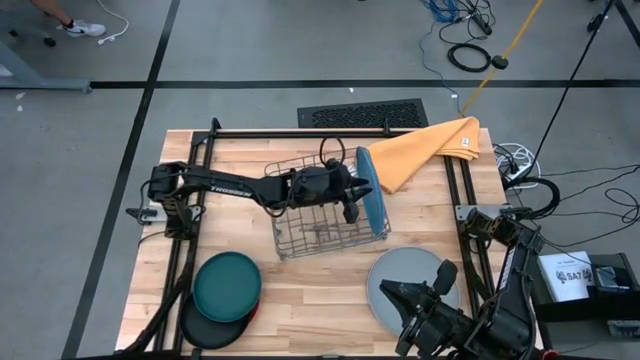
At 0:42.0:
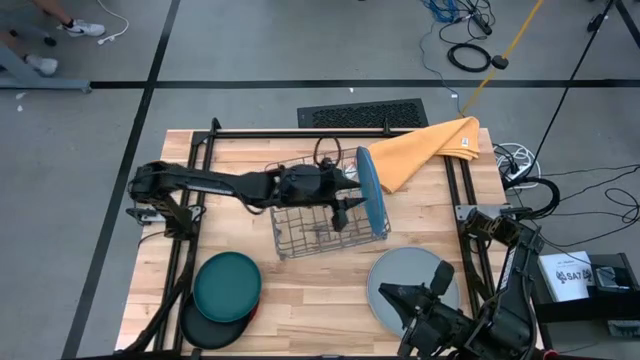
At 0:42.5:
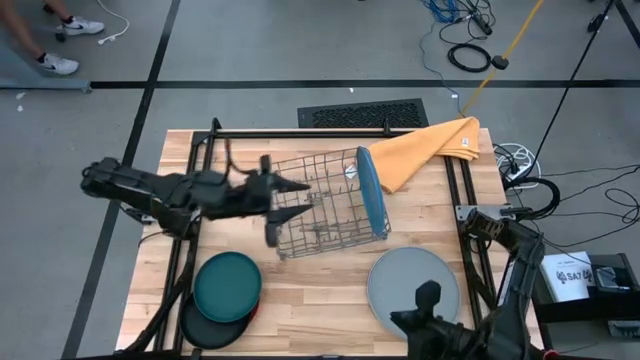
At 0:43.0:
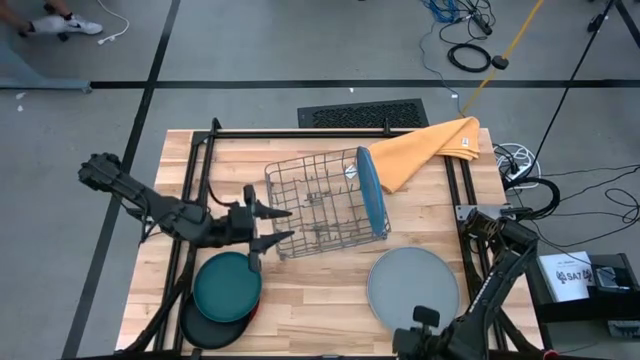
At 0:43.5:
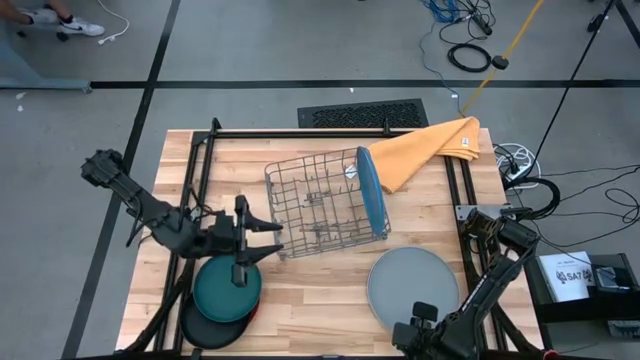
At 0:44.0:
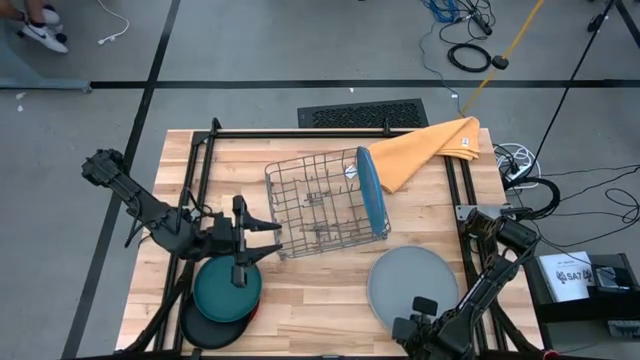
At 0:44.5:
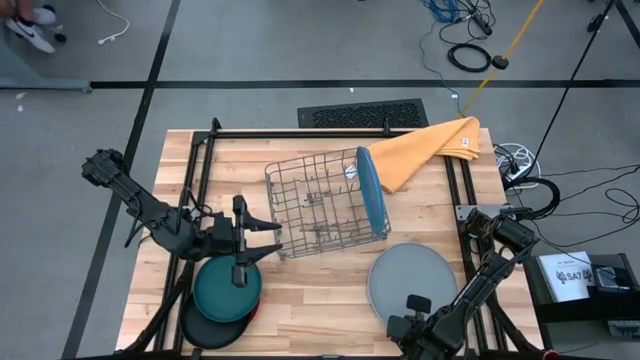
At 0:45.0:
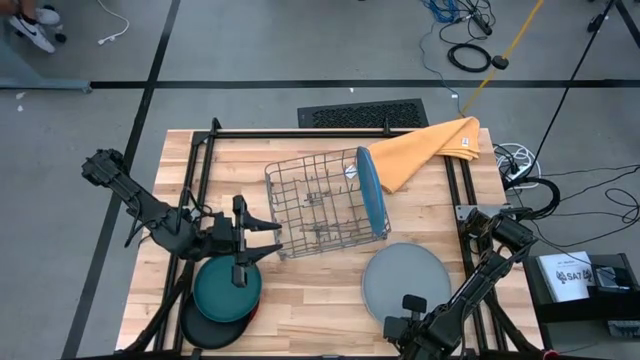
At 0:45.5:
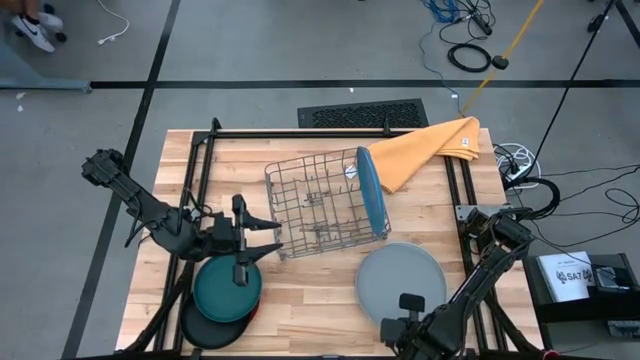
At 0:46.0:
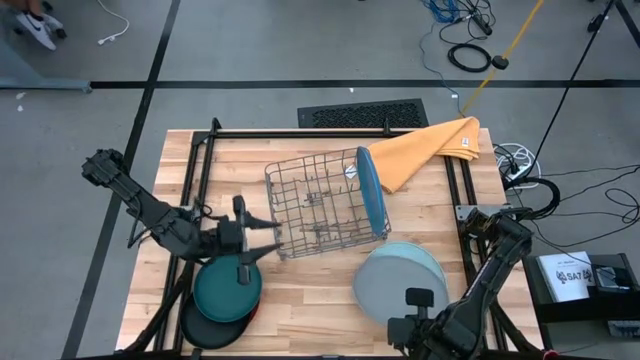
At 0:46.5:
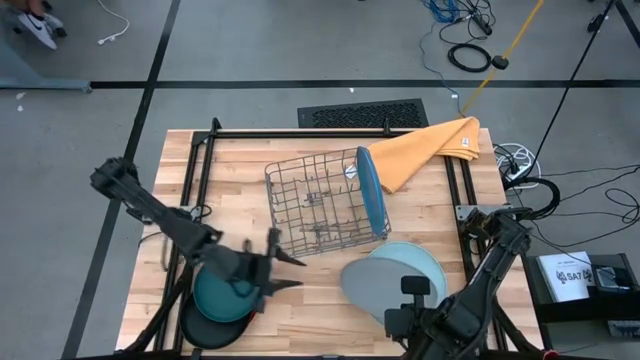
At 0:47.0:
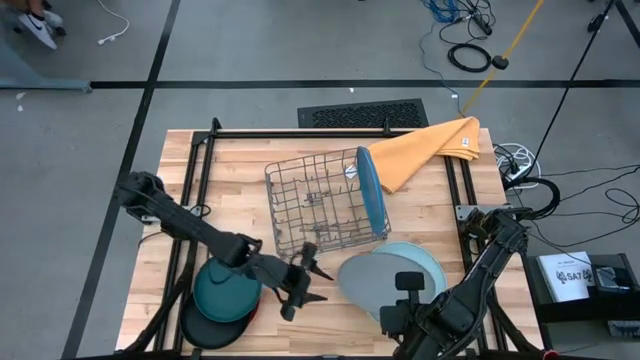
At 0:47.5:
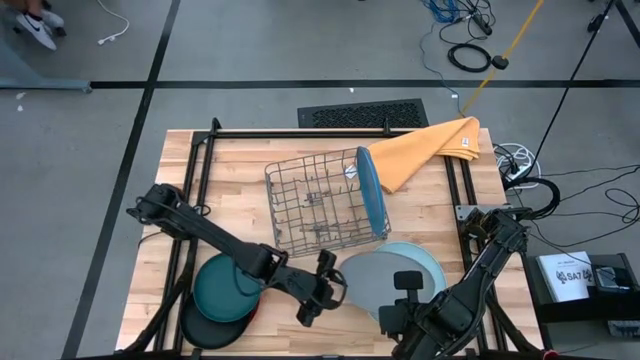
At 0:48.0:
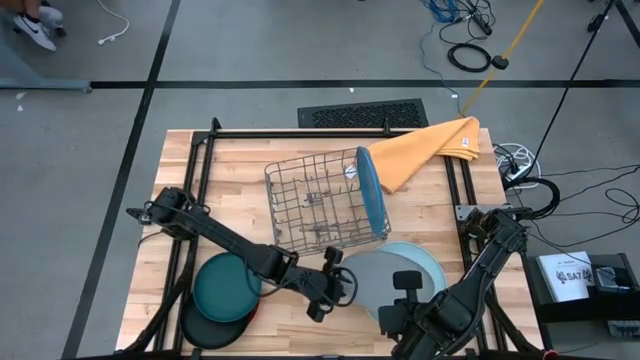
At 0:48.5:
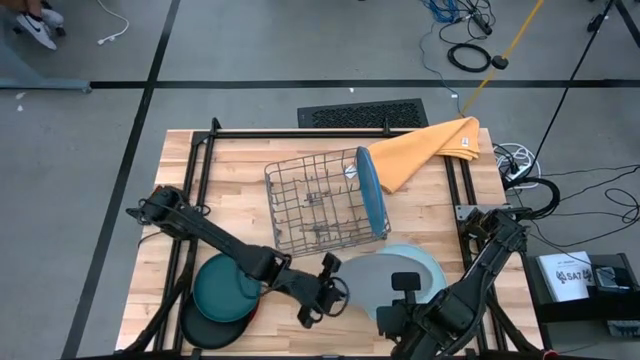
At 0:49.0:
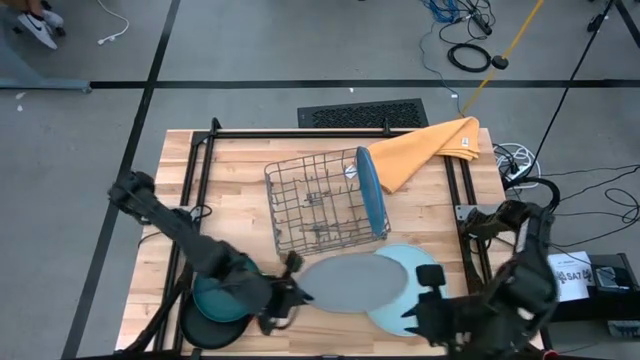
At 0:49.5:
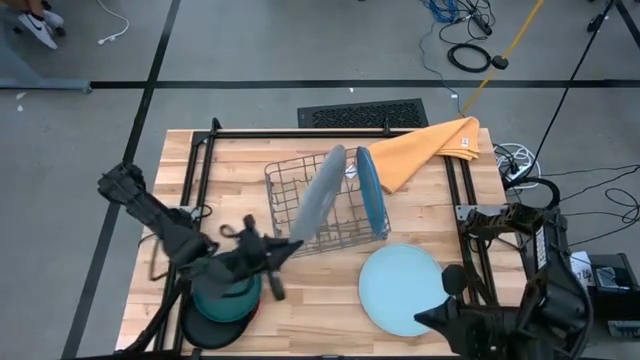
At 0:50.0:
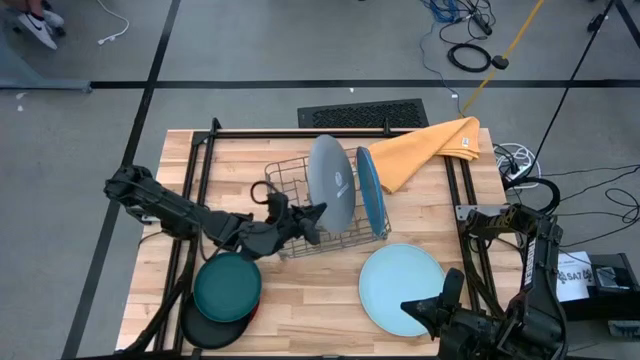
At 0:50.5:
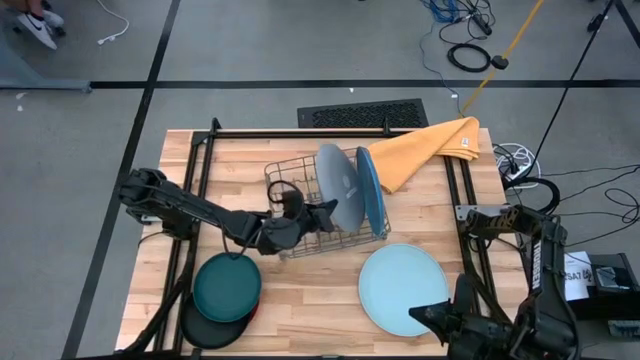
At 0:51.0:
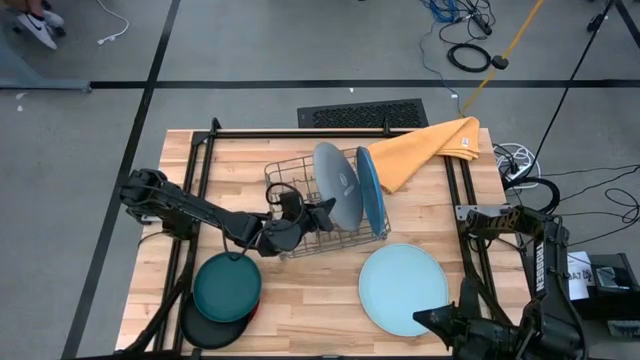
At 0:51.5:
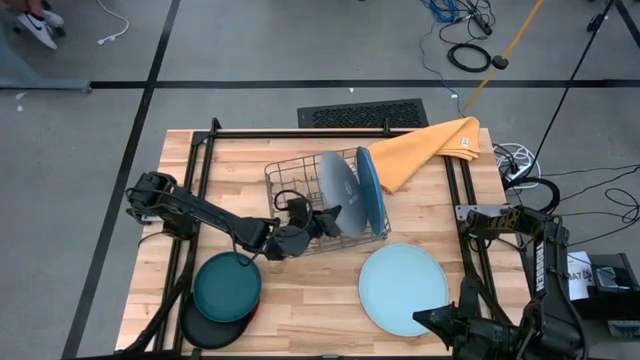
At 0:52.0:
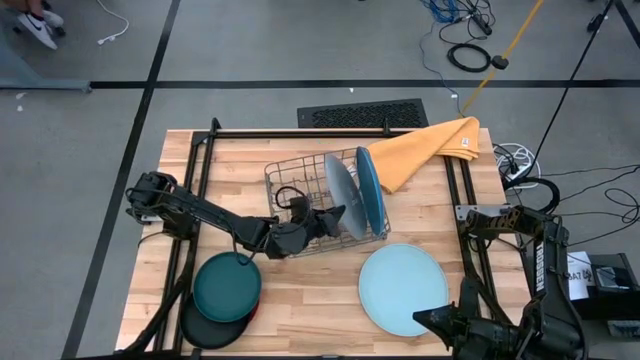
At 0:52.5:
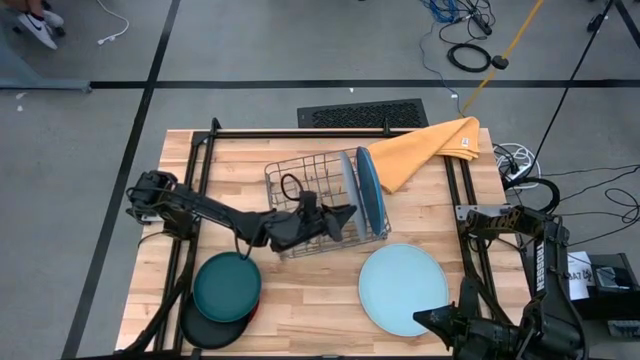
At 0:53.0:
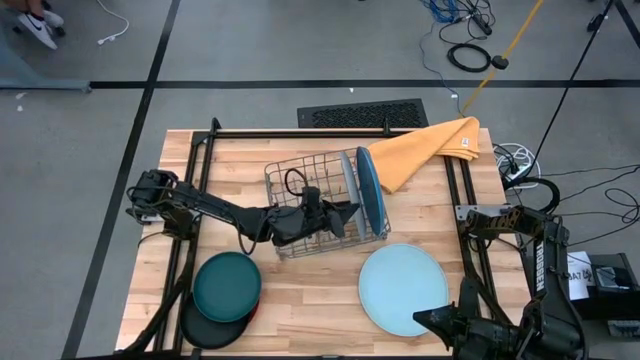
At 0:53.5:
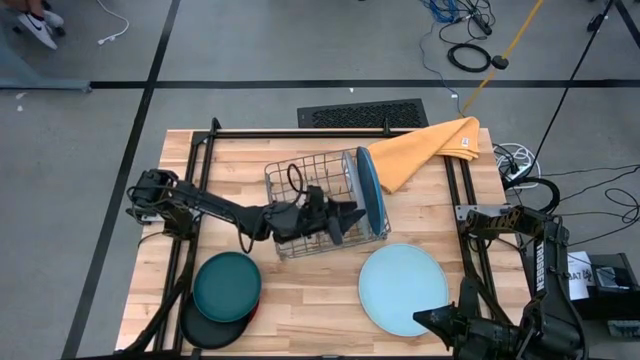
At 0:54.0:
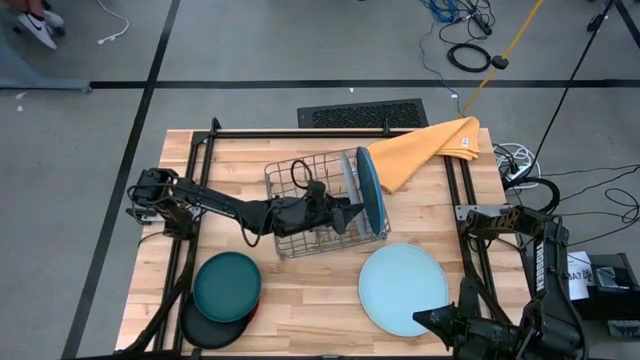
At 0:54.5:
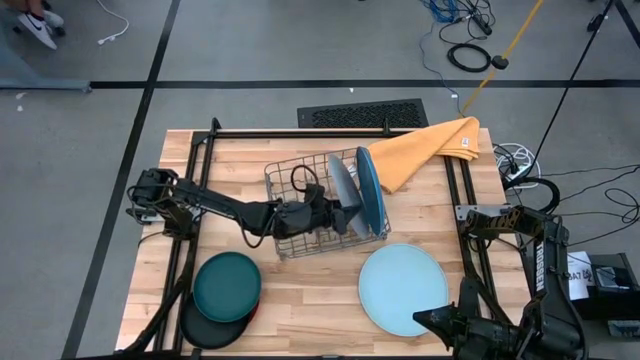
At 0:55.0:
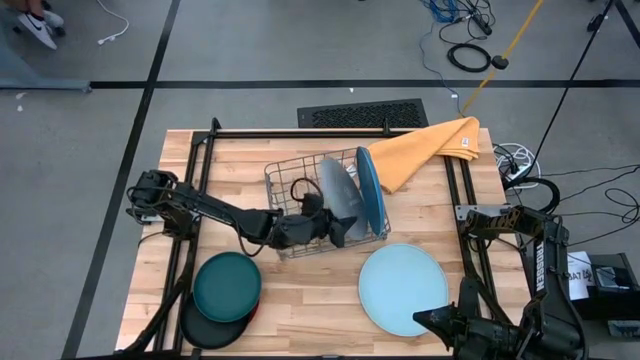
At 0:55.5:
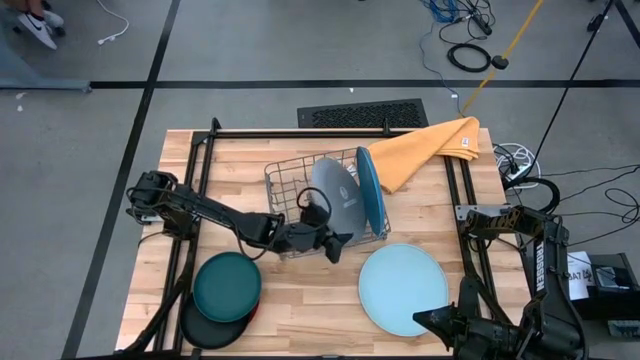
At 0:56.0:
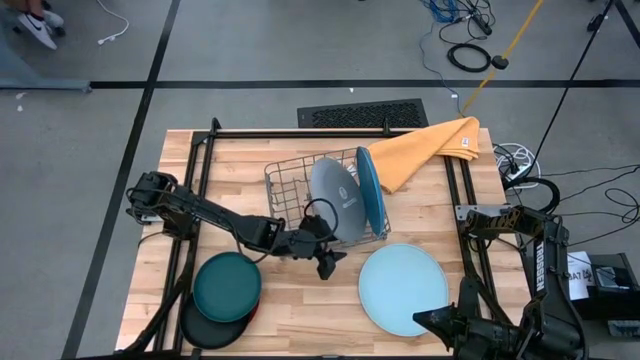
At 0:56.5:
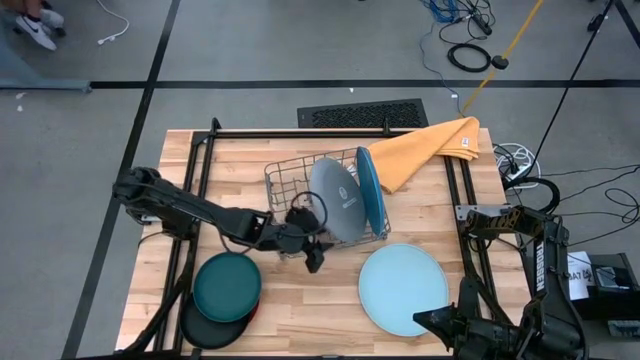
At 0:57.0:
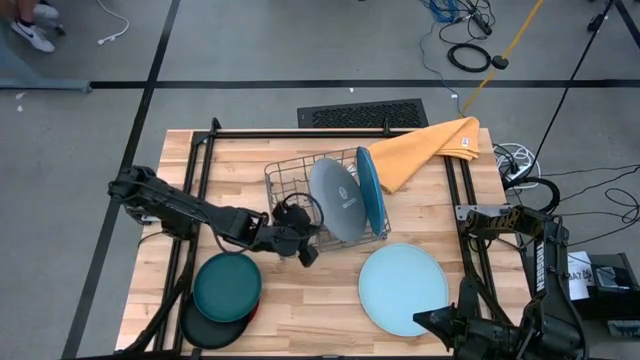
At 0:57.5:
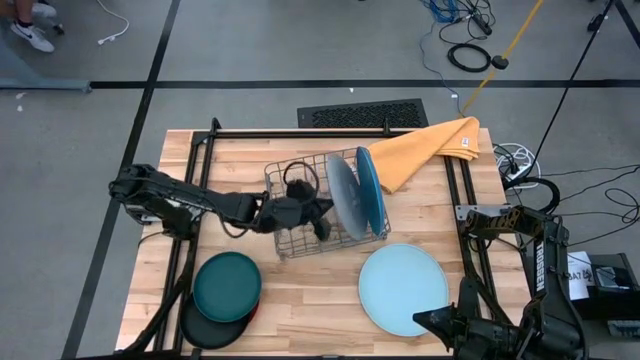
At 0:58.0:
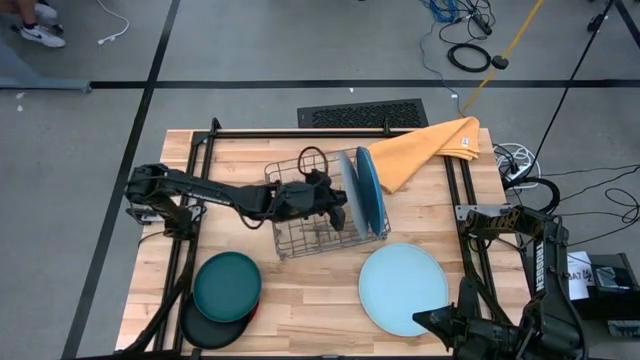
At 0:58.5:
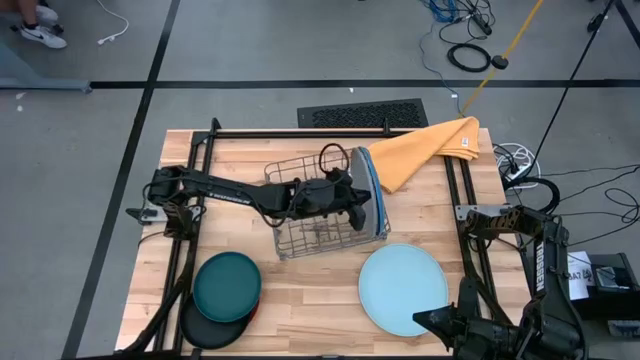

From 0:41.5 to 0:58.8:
Task: Sort dishes
Put the gray plate into the green dish rack

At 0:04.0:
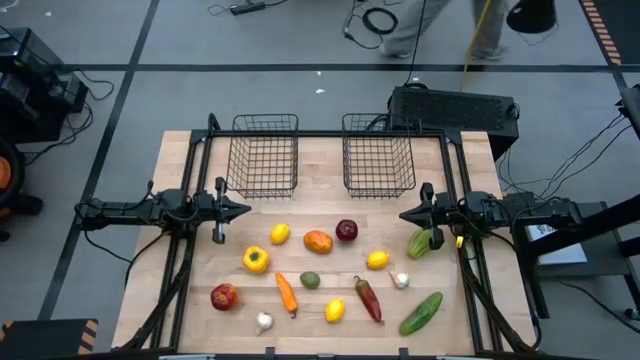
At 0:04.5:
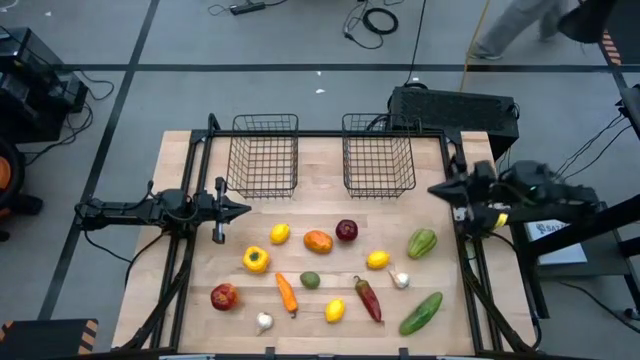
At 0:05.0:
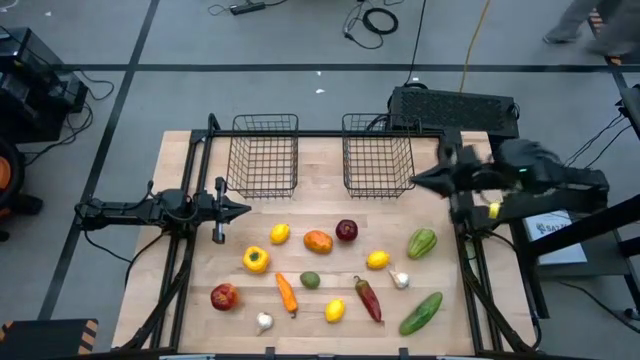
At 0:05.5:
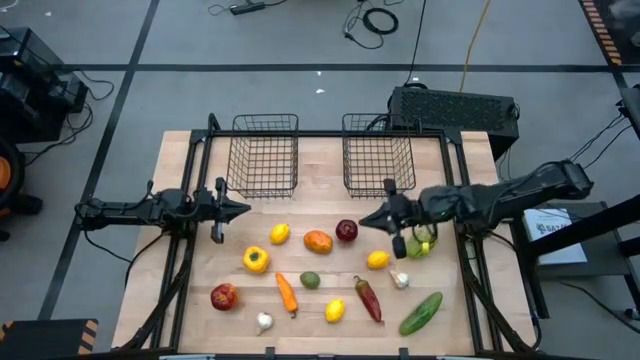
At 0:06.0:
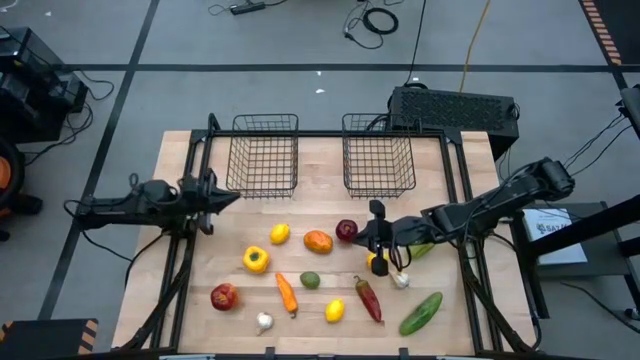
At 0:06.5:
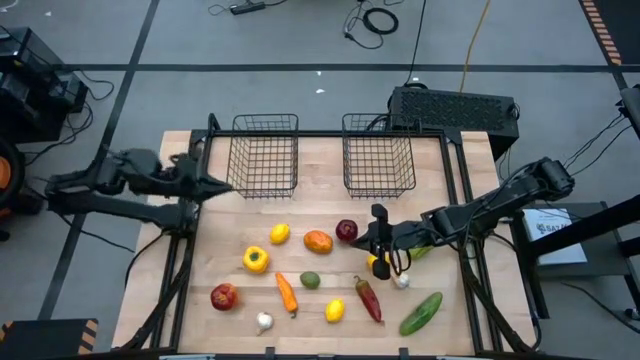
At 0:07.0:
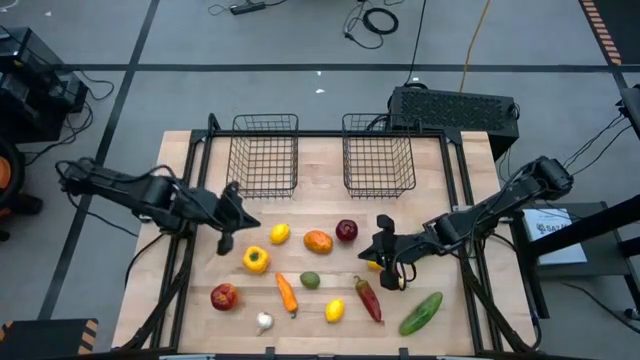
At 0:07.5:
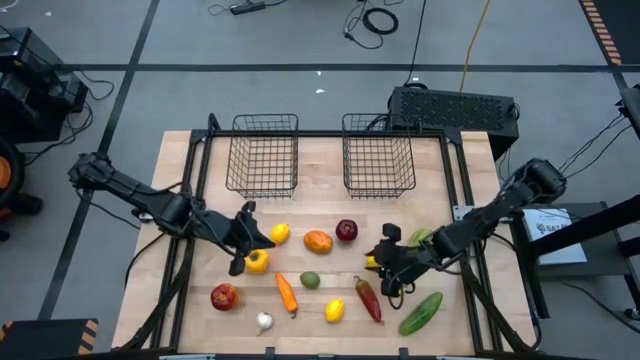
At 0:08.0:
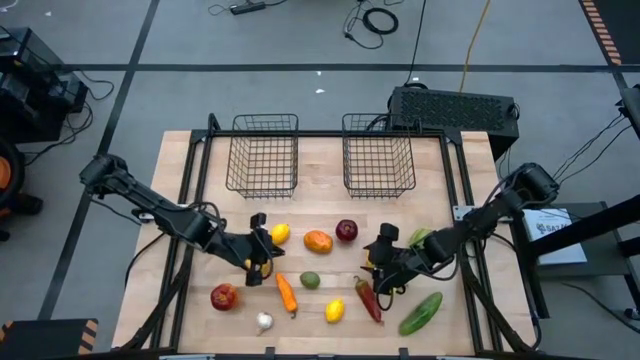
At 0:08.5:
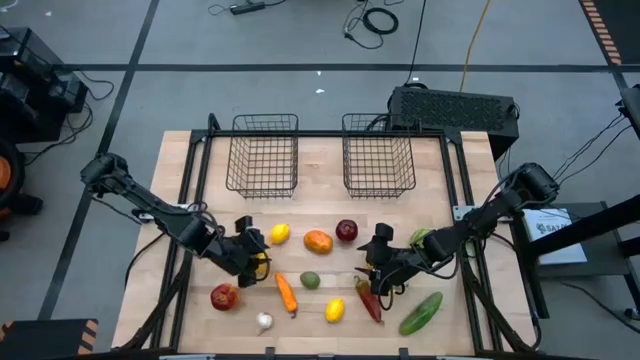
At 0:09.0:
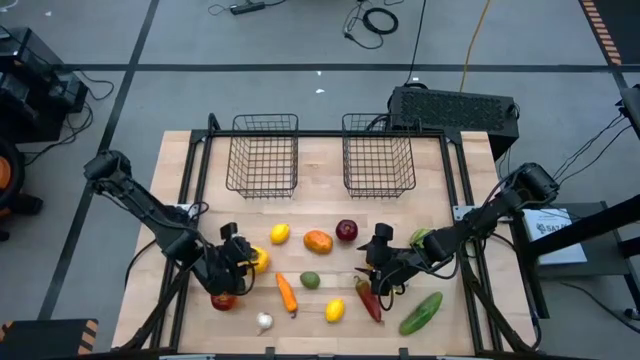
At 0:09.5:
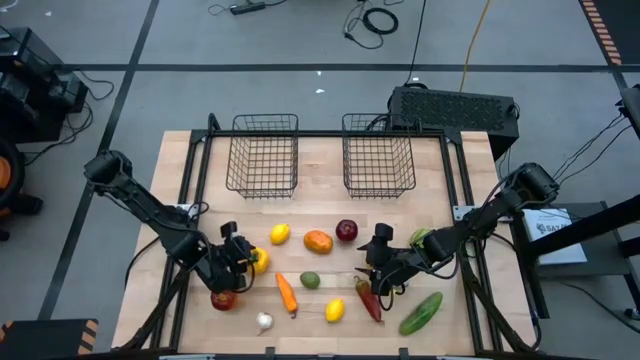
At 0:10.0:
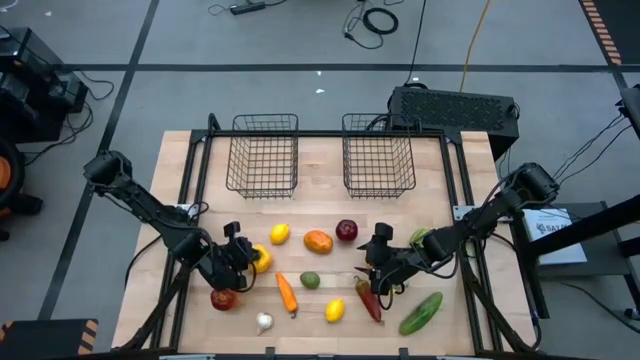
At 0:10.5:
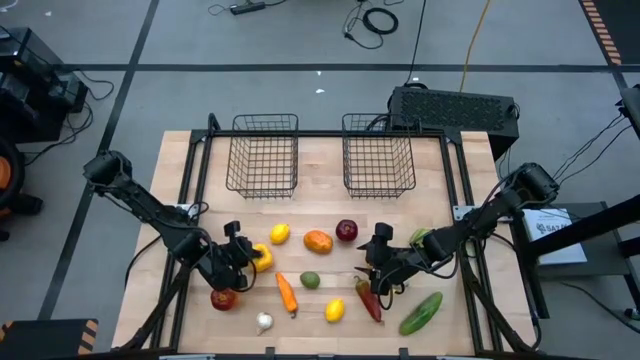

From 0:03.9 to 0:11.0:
Task: Sort produce into baskets
Put the yellow bell pepper into the right mesh basket
